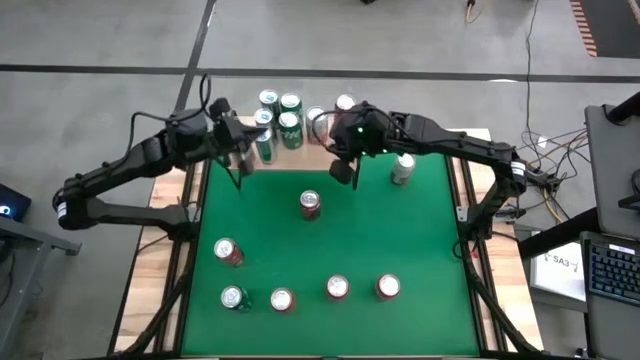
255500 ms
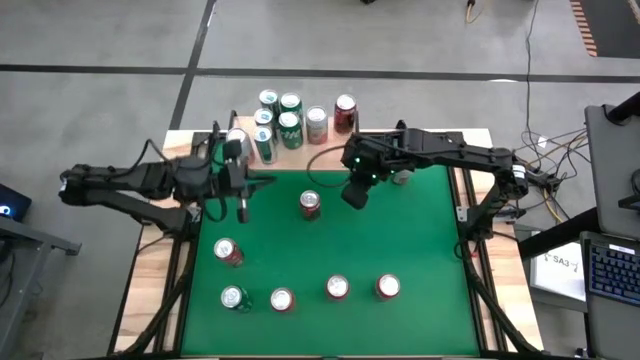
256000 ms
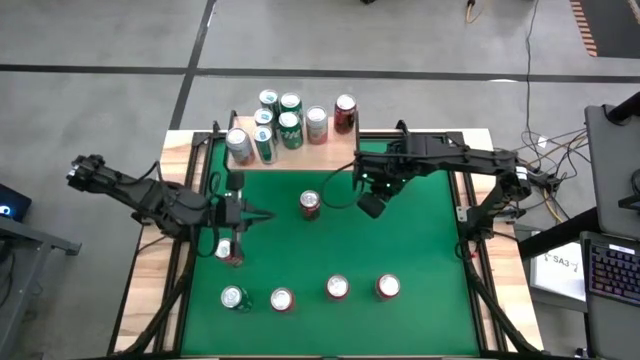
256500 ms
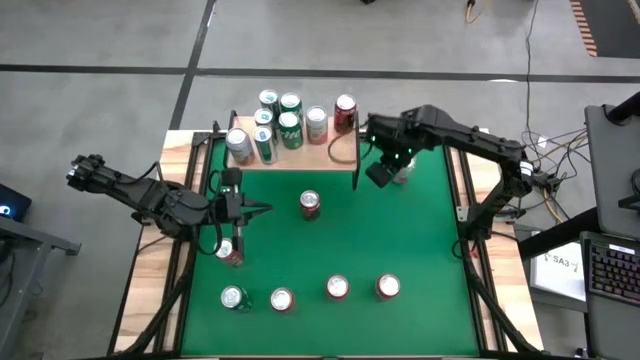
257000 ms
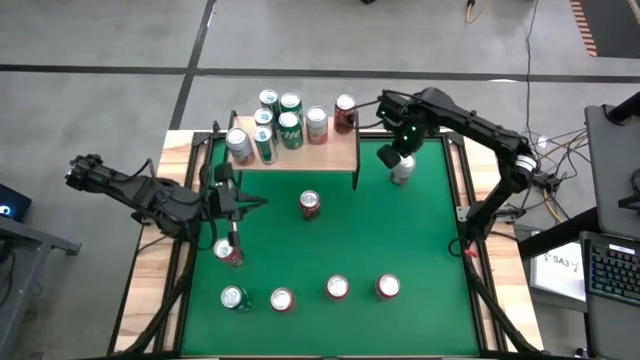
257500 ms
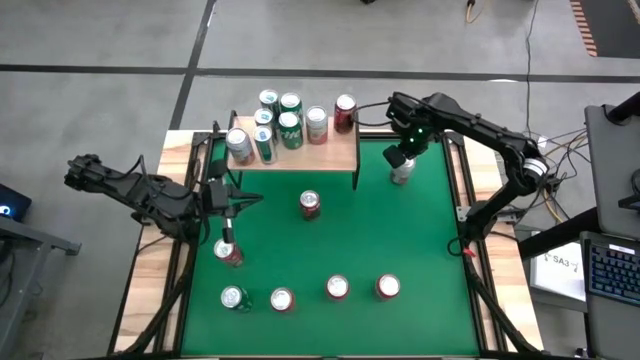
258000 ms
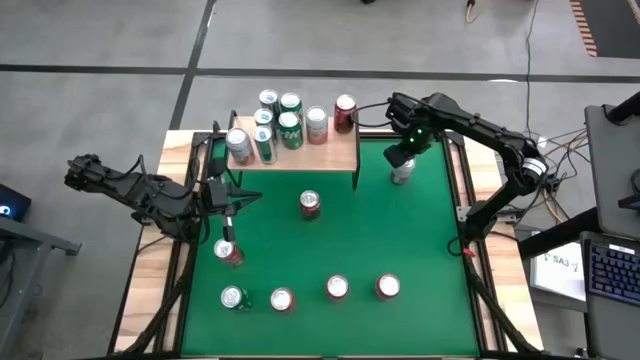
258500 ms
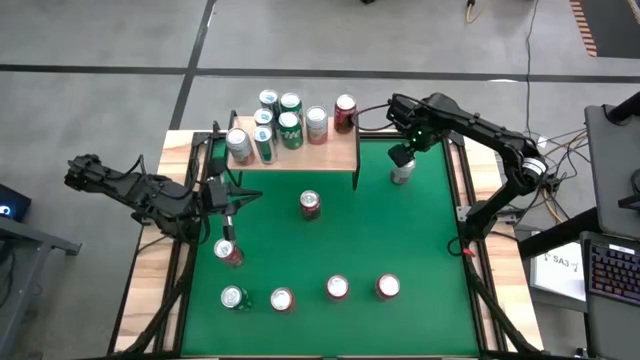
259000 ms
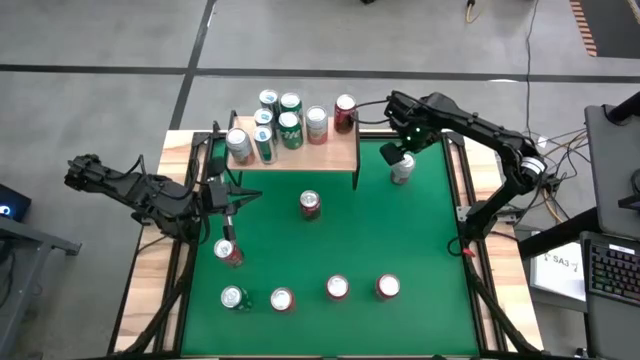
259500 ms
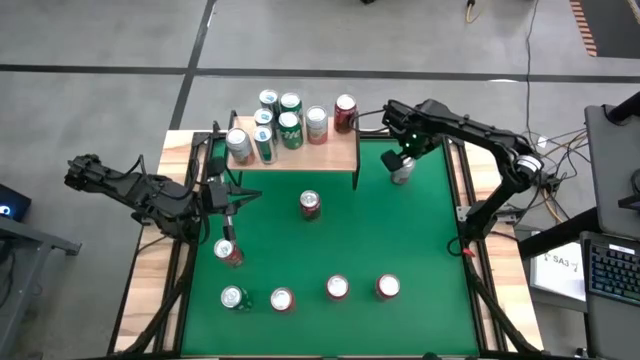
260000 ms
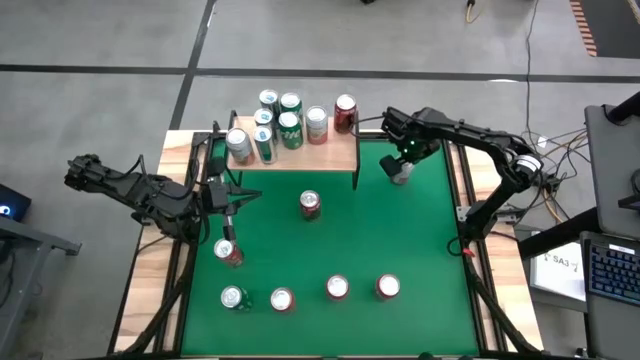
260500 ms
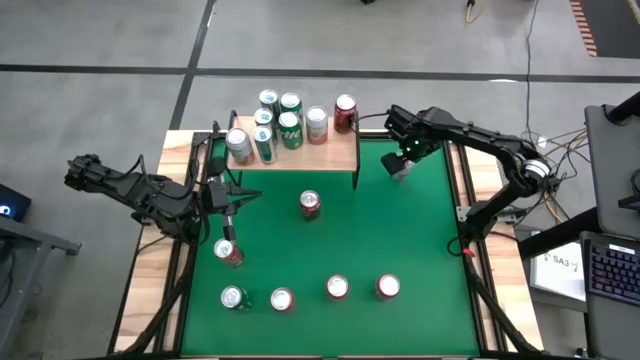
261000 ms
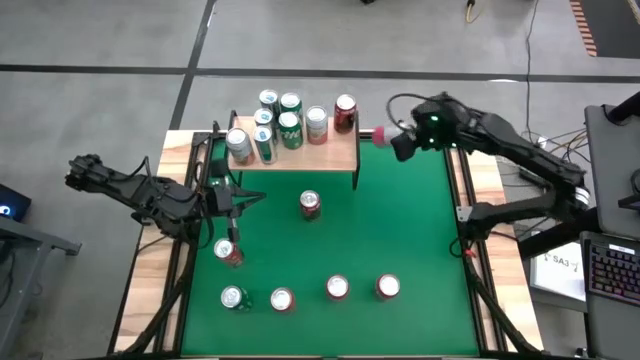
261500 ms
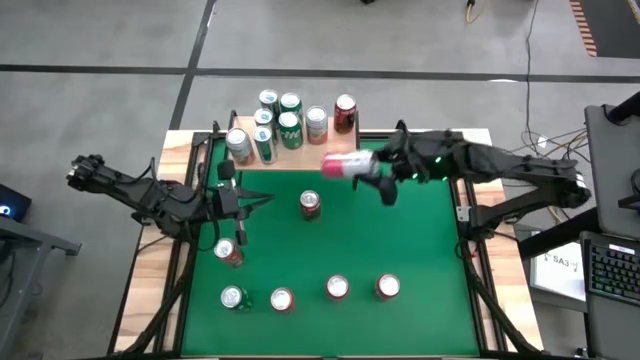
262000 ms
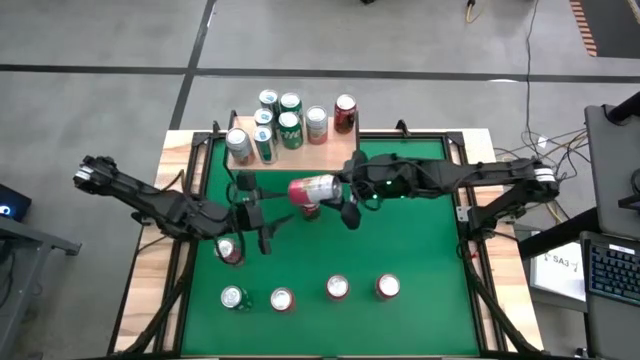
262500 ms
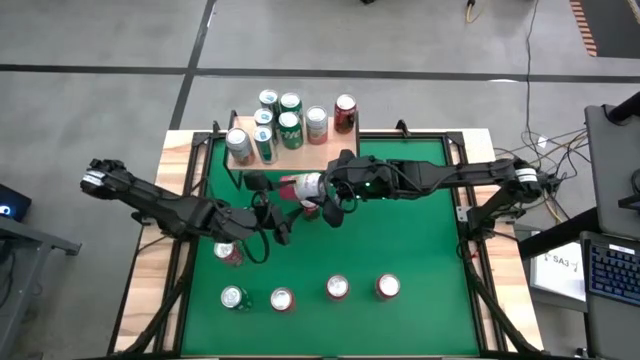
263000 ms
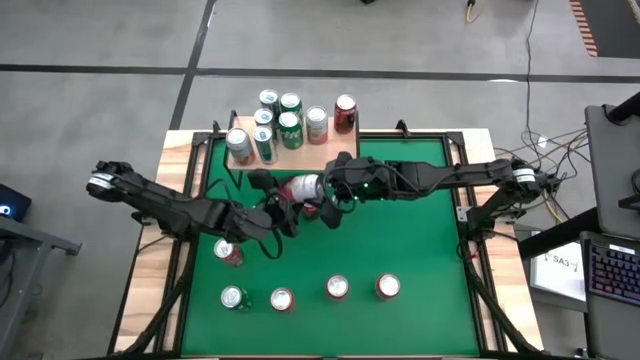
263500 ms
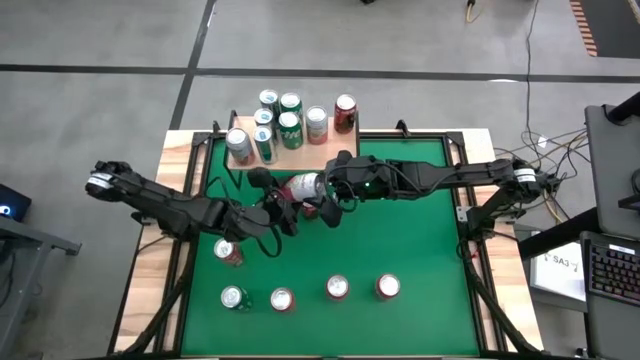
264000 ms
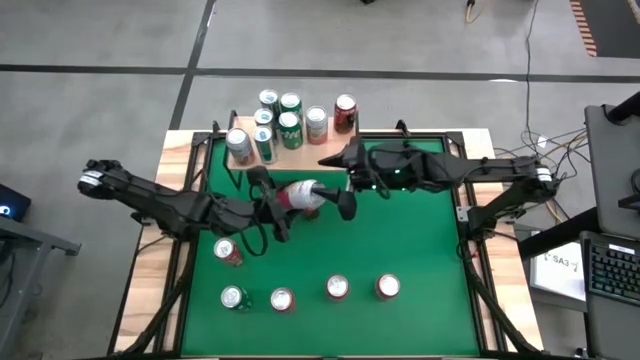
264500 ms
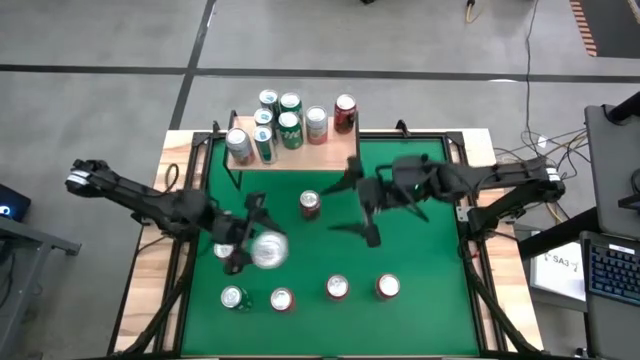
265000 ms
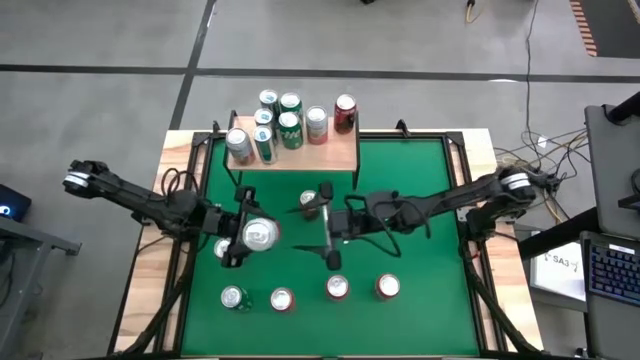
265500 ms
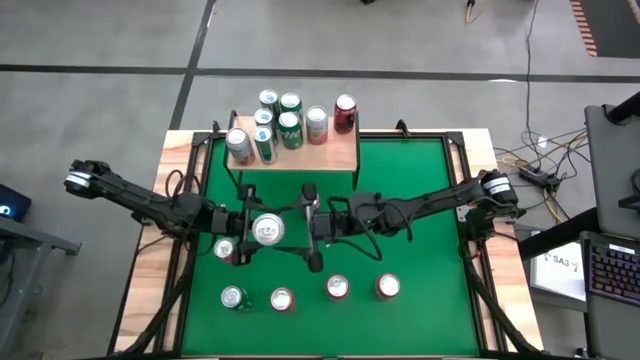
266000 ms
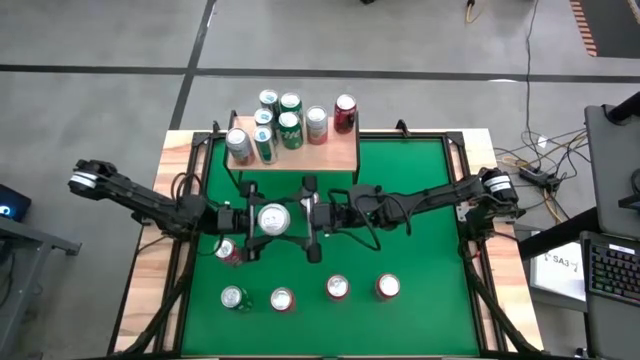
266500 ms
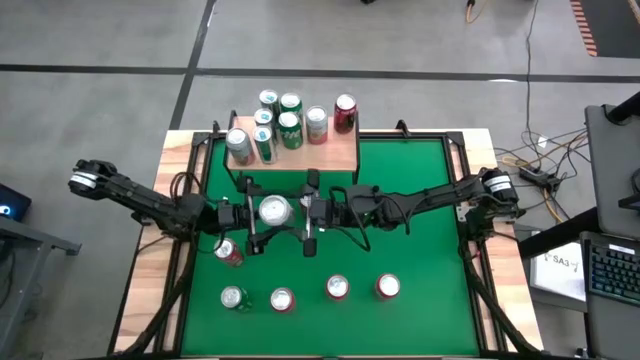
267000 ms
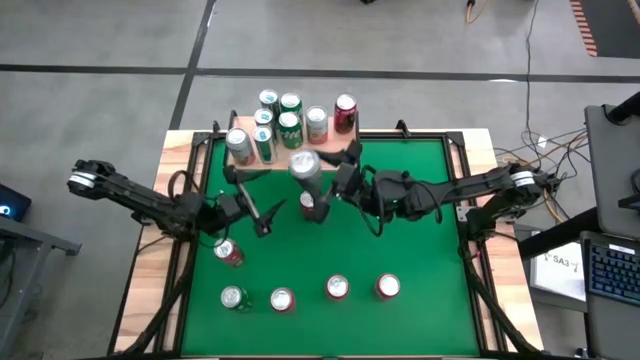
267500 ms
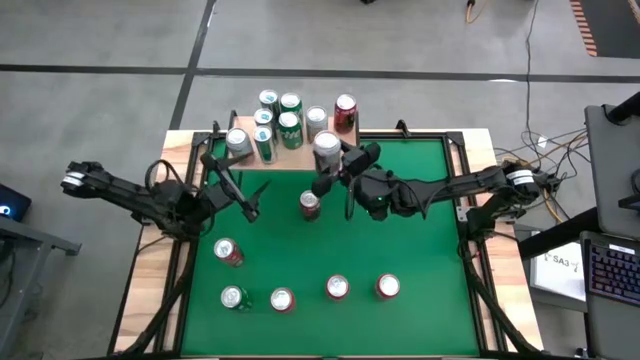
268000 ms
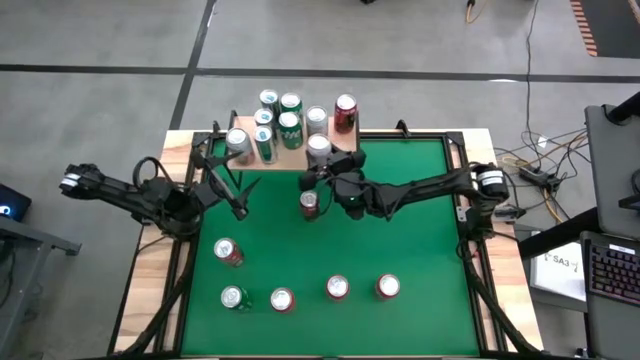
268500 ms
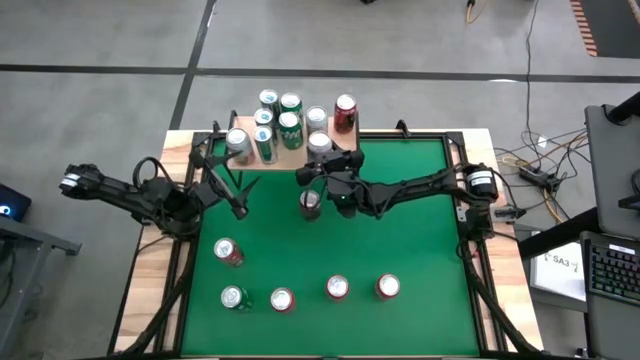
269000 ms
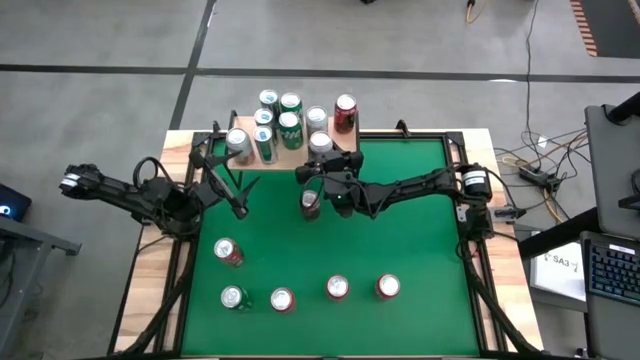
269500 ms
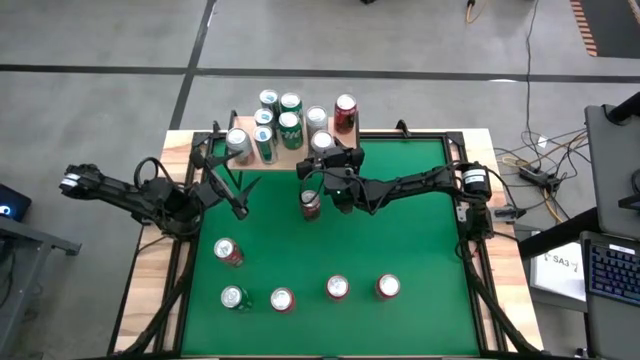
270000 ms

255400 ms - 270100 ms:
Task: Place canned beverage on shelf
Put the white and red can on the shelf

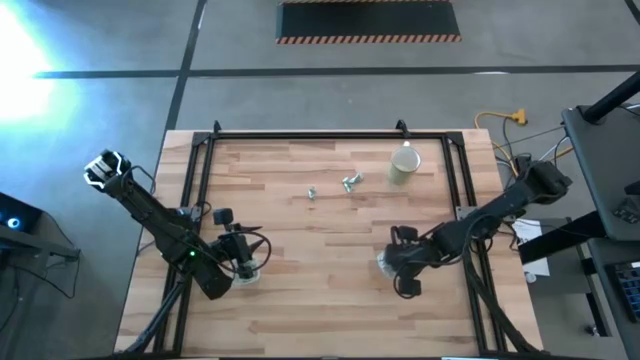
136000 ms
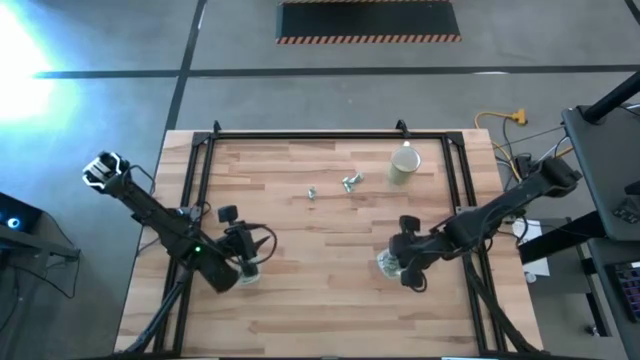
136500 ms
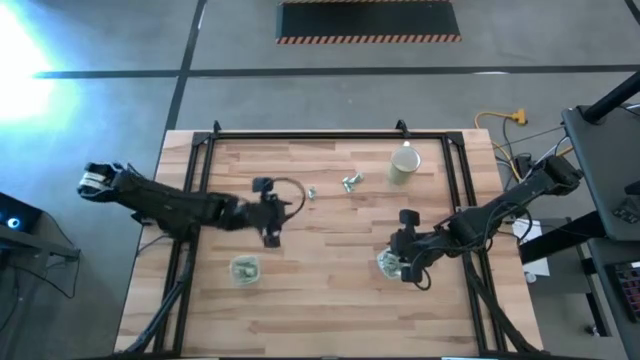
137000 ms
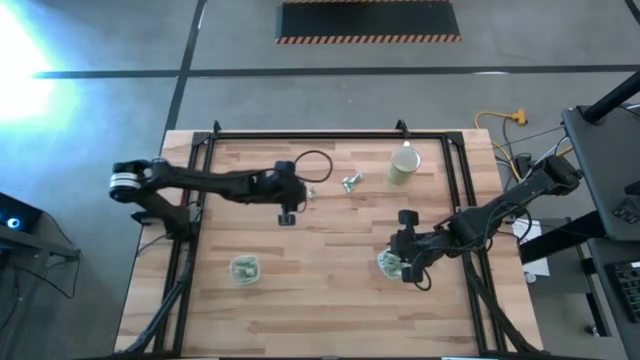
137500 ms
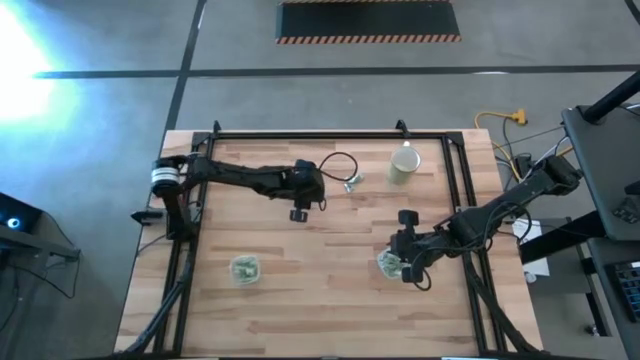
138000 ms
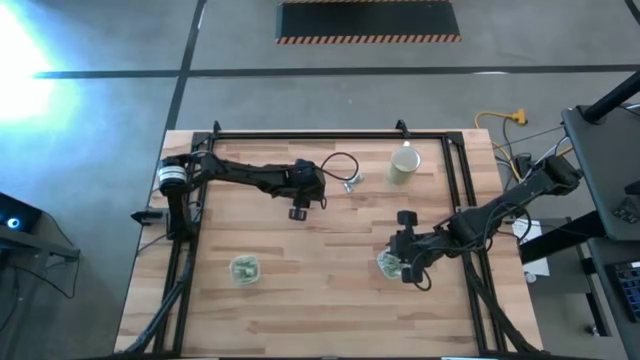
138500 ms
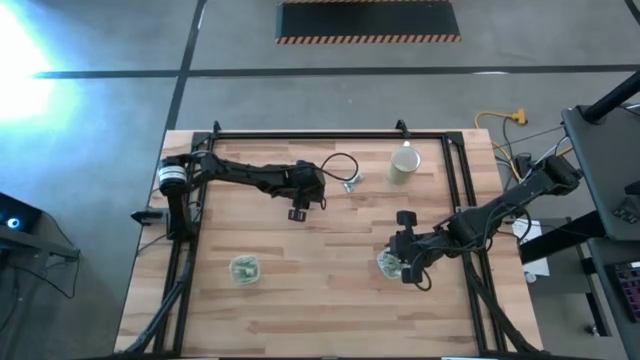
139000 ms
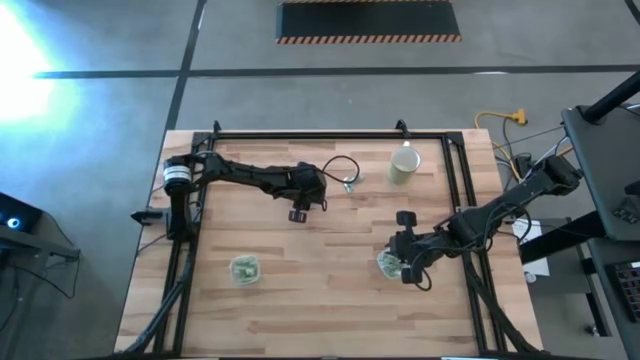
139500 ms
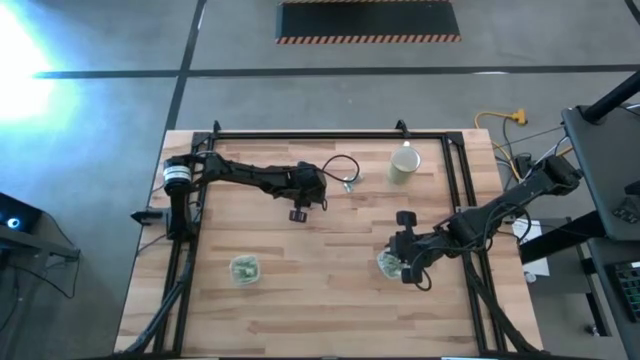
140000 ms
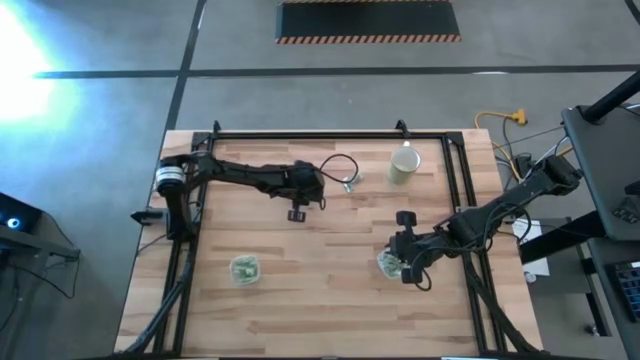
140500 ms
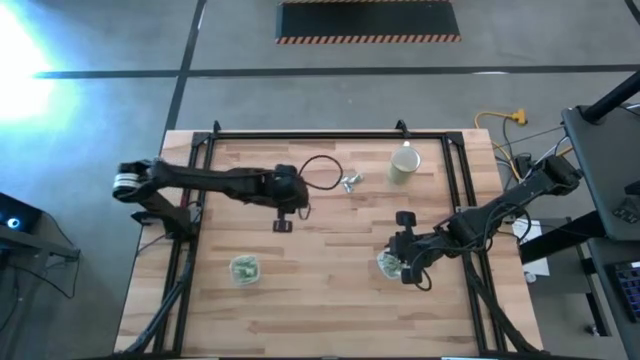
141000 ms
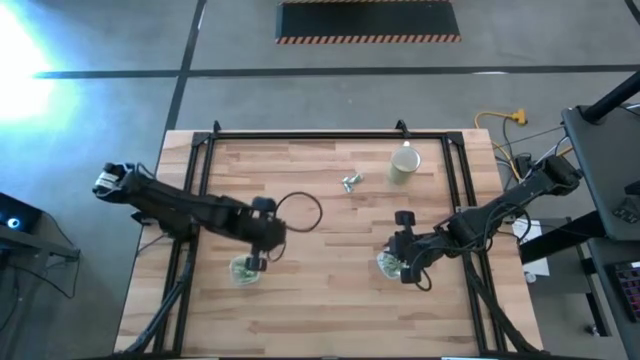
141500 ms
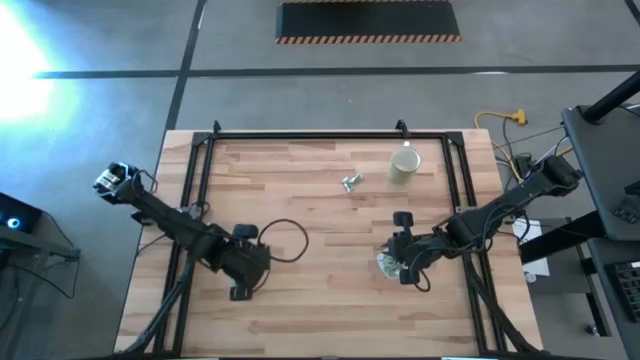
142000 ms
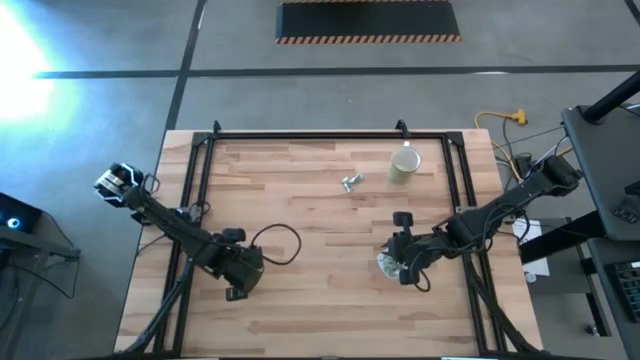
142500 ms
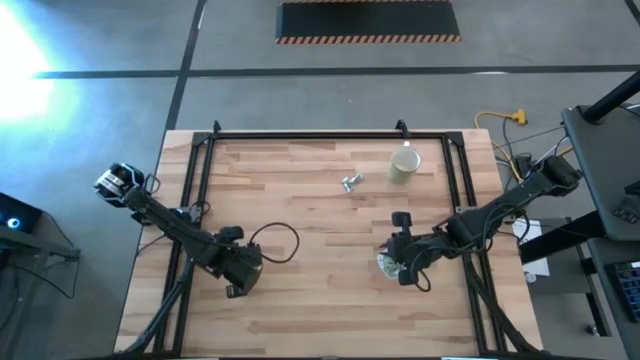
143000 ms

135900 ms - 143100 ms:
Task: Pick and place Stevia / Truvia into bins
Put the stevia packet into the left transparent container
